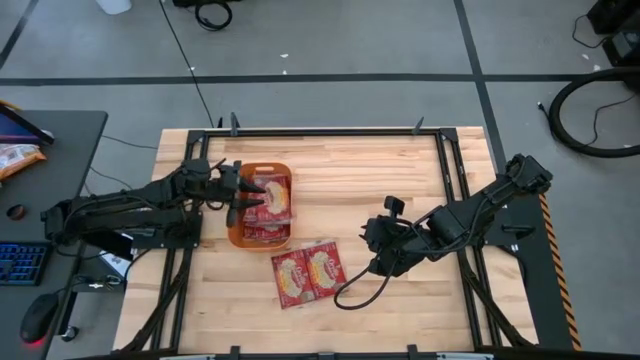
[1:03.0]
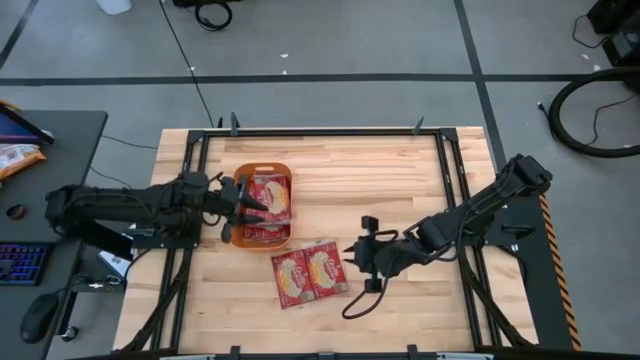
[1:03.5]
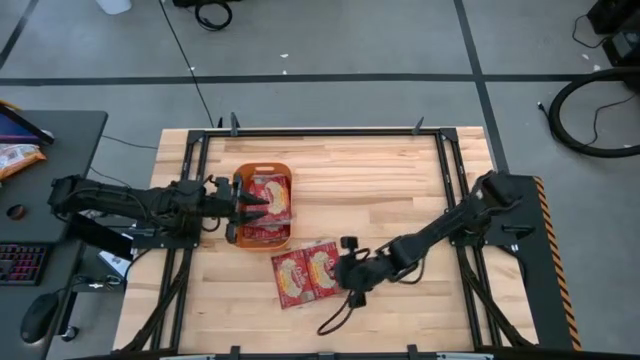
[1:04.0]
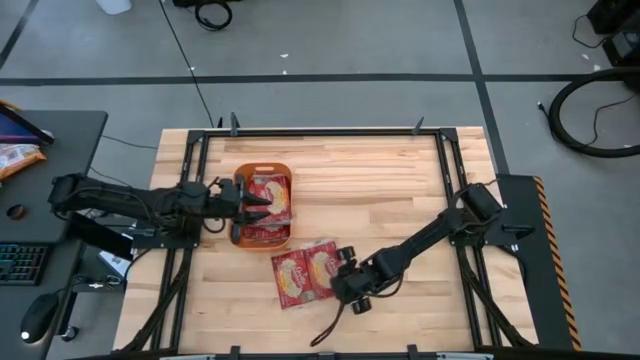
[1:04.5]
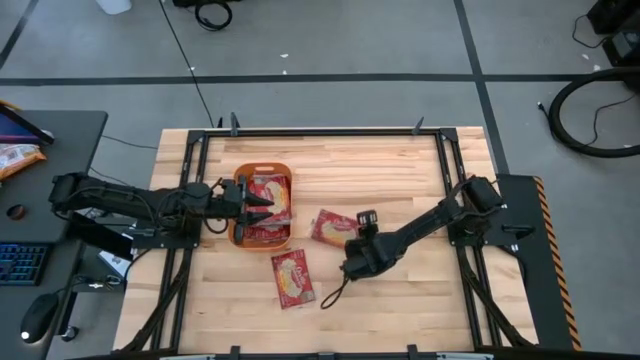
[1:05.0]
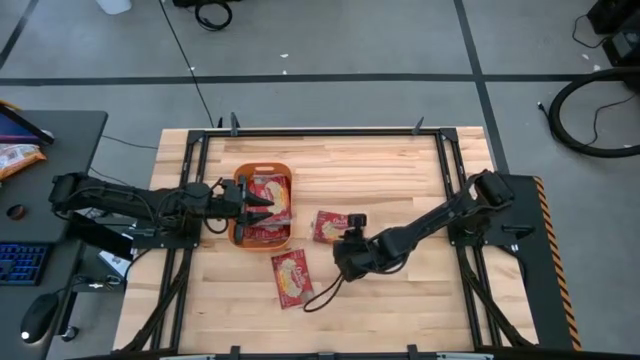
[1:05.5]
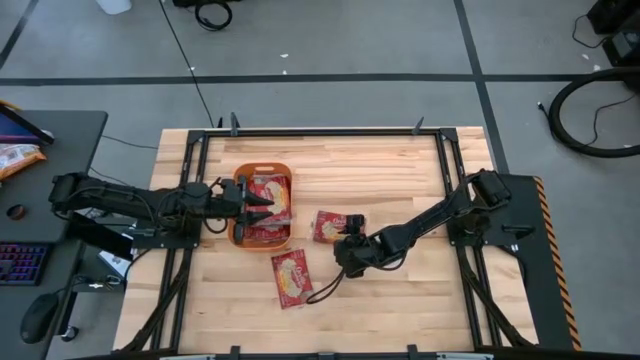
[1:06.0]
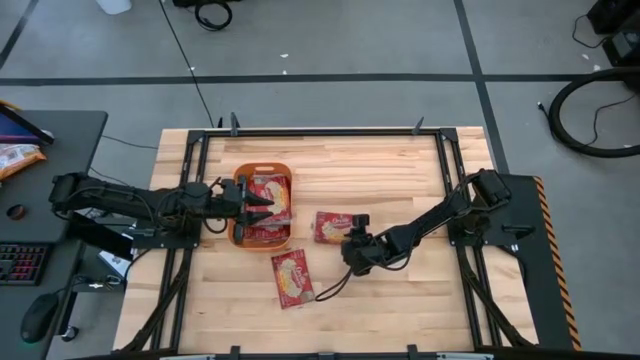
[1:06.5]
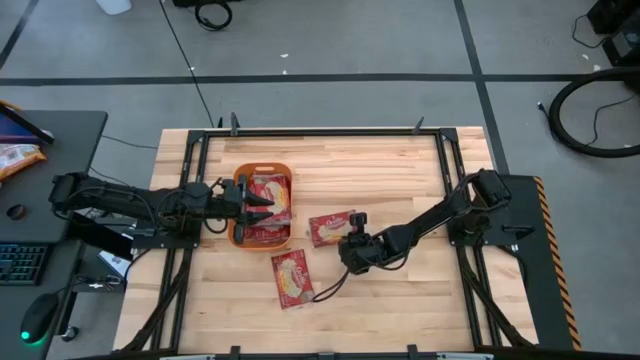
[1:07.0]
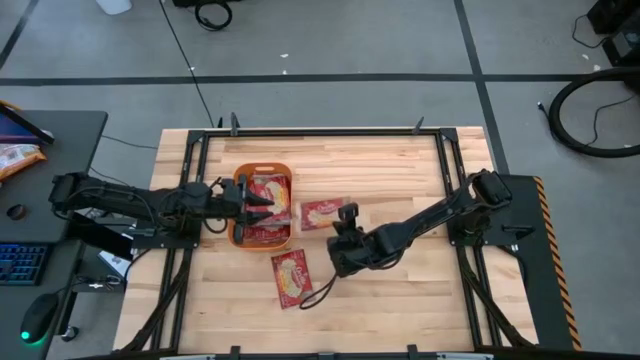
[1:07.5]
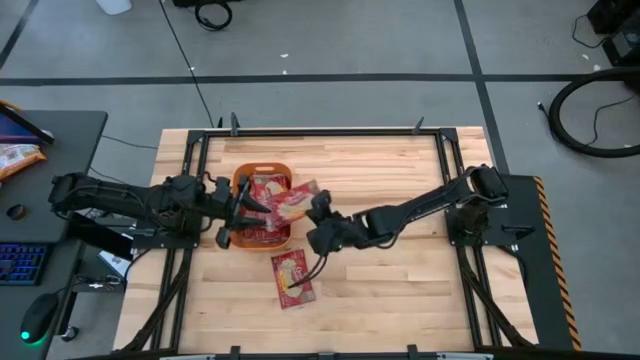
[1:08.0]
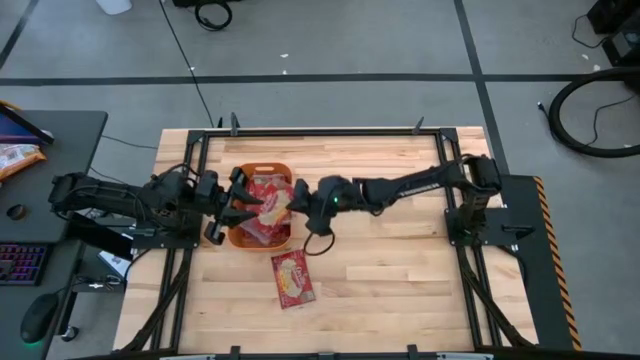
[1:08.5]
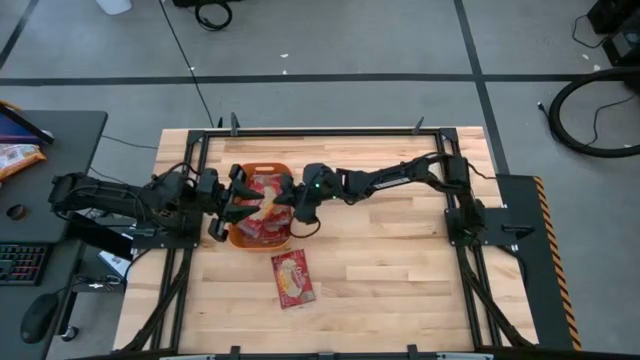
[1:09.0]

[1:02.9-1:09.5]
Task: Sort popcorn bags into baskets
Put the red popcorn bag into the orange bin

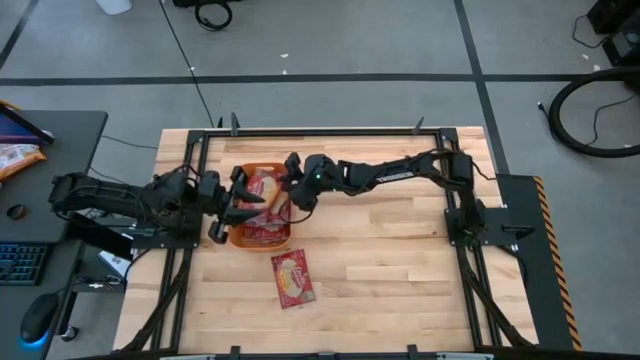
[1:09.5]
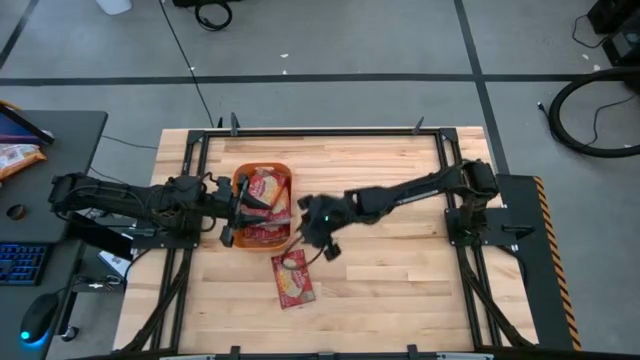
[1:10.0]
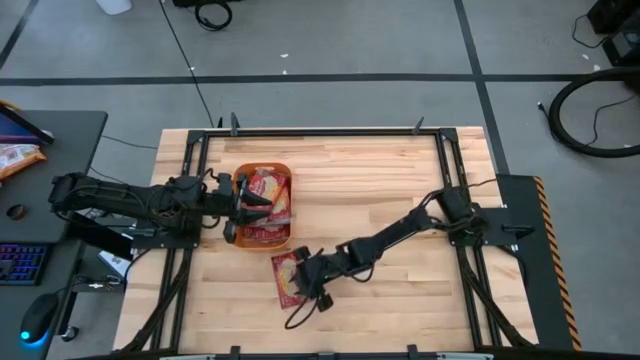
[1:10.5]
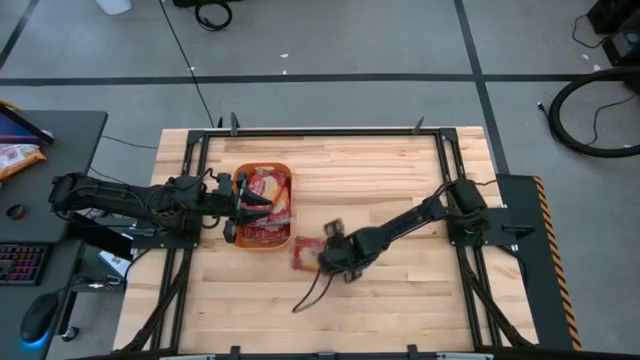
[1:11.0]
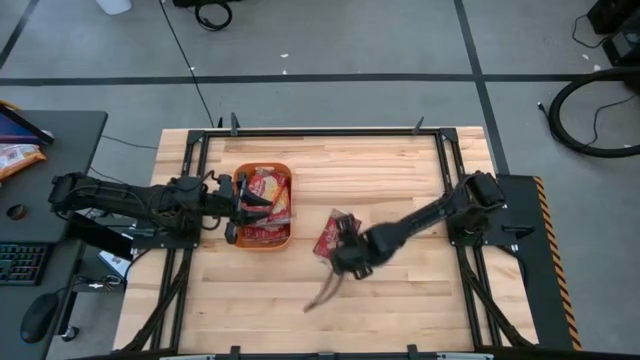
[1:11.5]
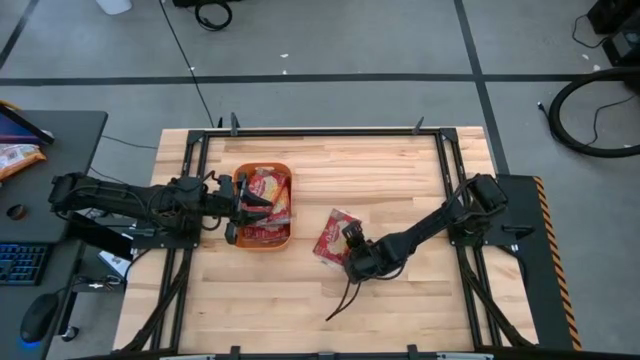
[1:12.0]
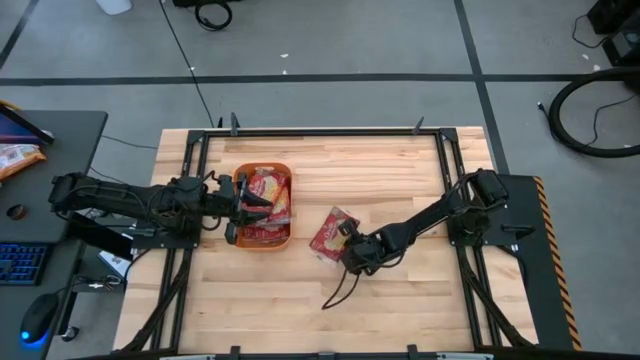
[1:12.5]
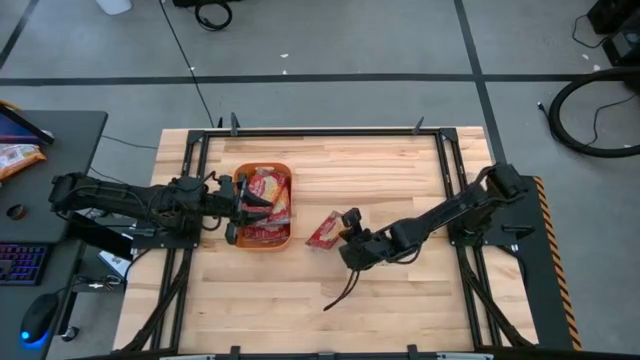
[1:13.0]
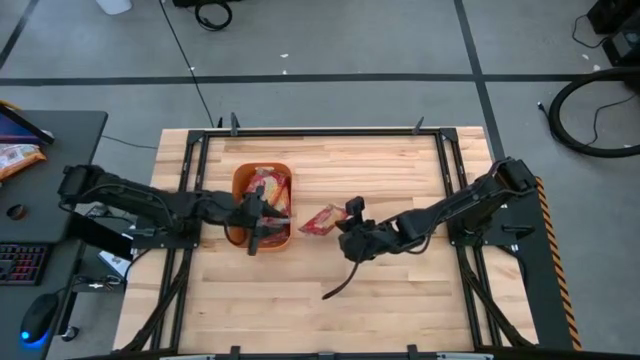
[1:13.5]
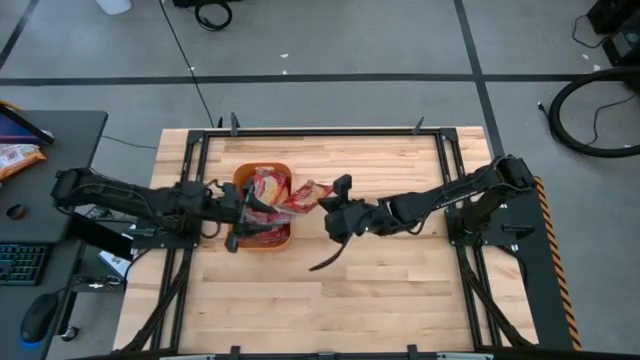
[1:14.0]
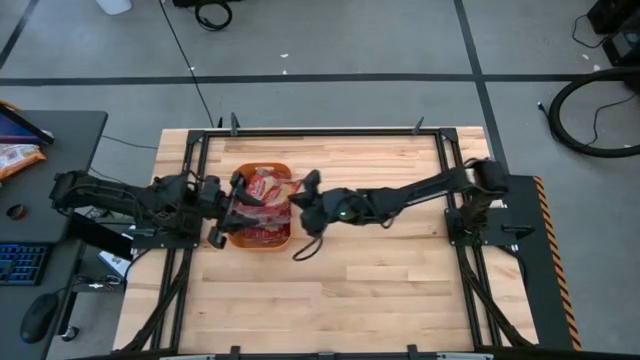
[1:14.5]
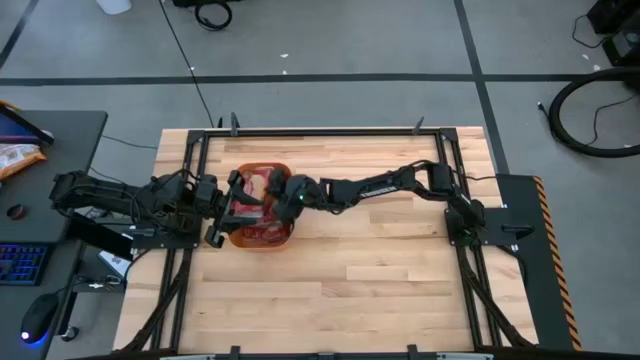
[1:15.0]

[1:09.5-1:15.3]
Put the red popcorn bag into the orange bin

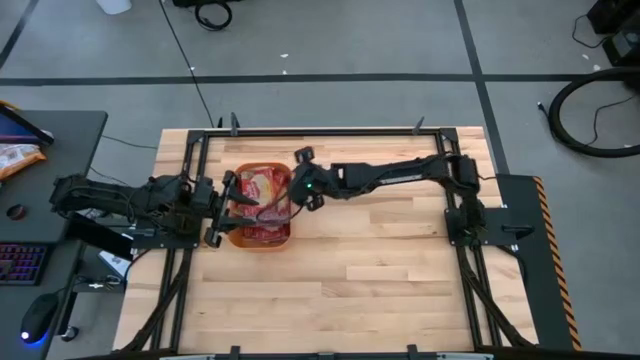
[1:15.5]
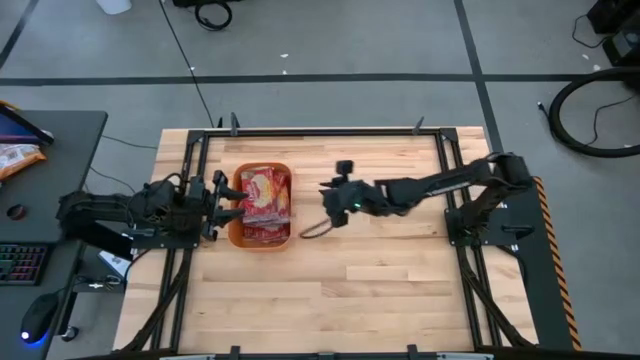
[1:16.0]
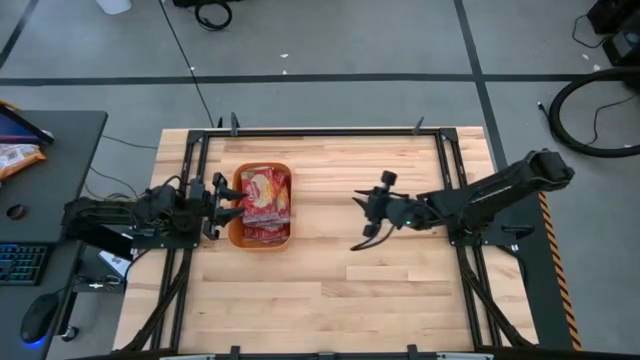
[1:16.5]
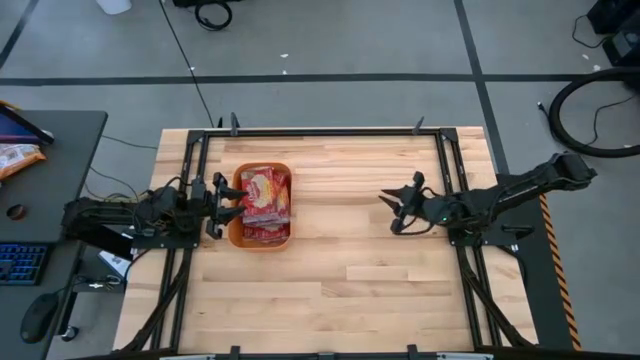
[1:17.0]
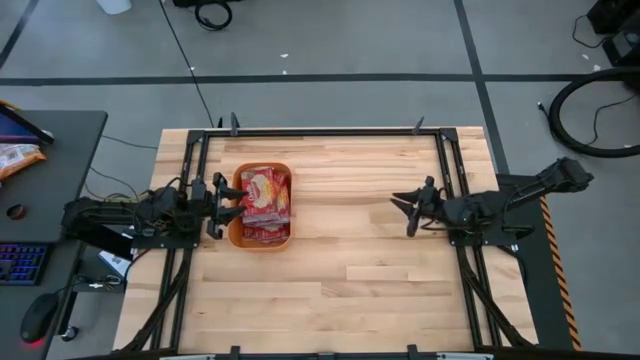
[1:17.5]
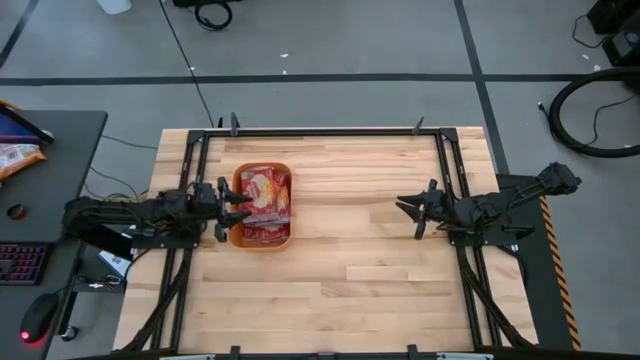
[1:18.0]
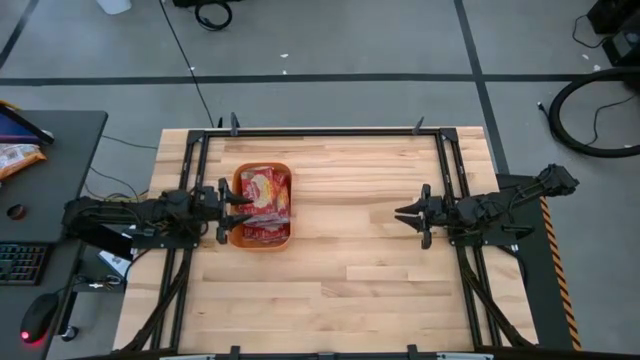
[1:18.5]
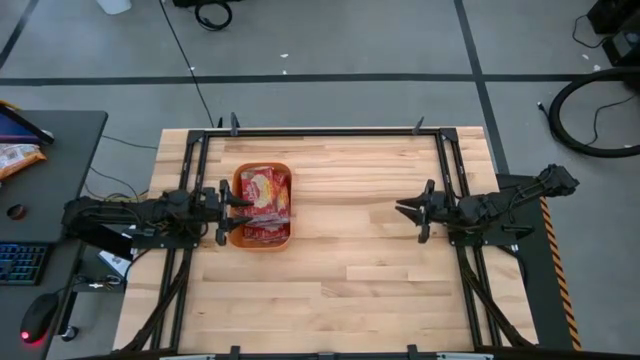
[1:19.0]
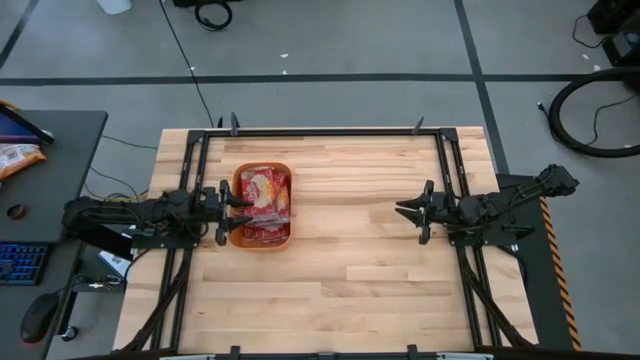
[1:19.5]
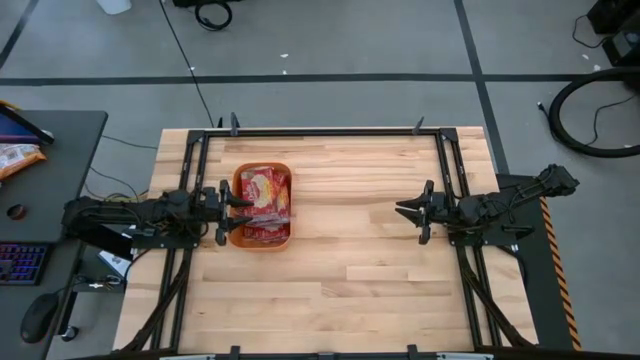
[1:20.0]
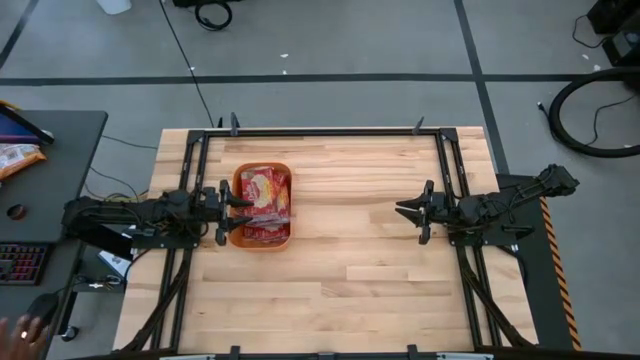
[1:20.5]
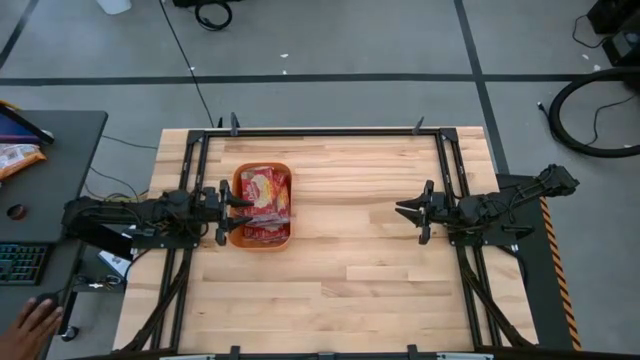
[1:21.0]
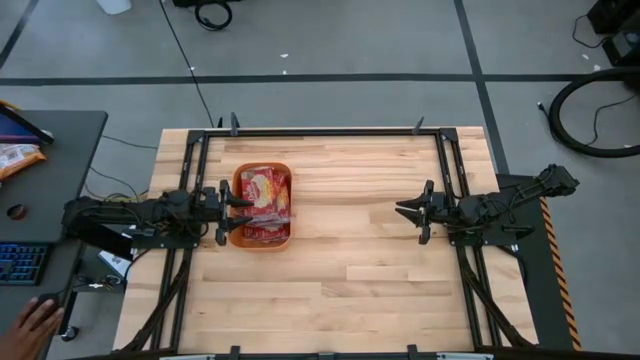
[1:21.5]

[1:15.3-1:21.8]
Return to Home Position

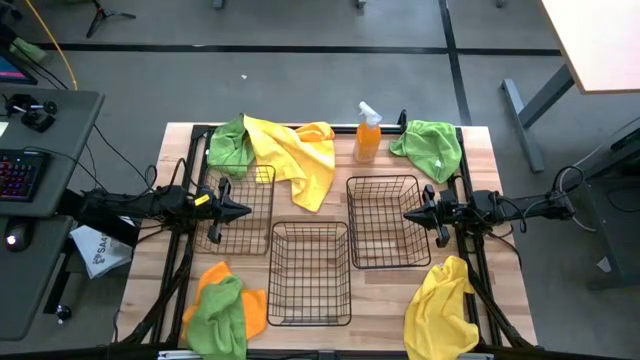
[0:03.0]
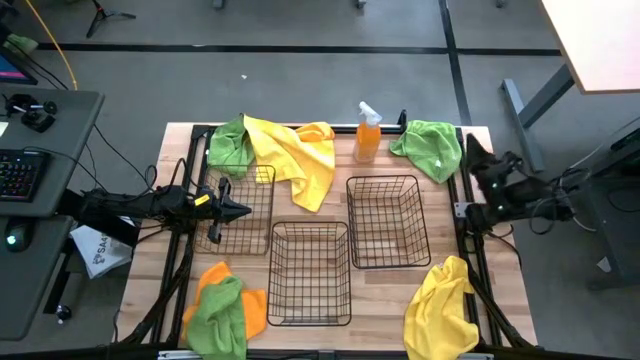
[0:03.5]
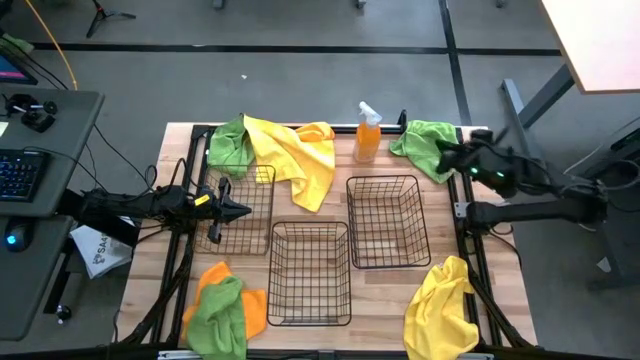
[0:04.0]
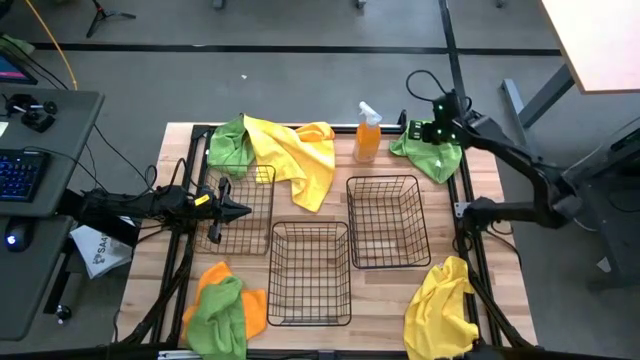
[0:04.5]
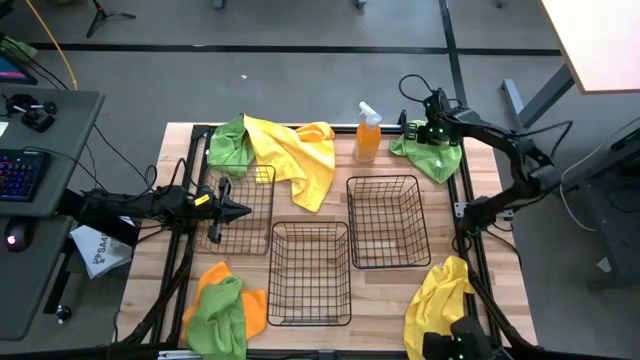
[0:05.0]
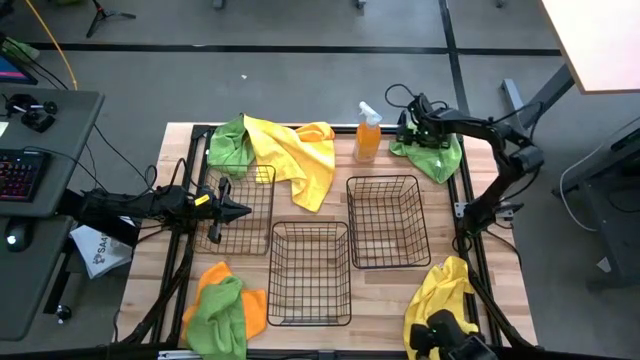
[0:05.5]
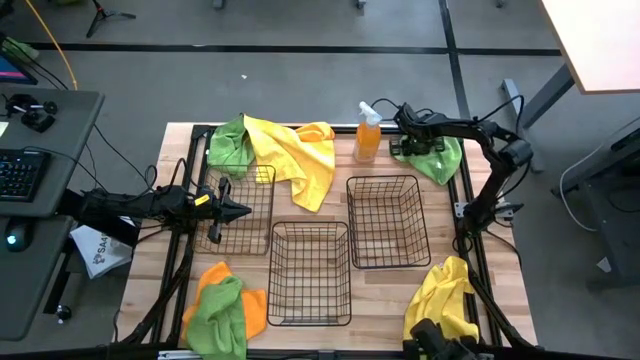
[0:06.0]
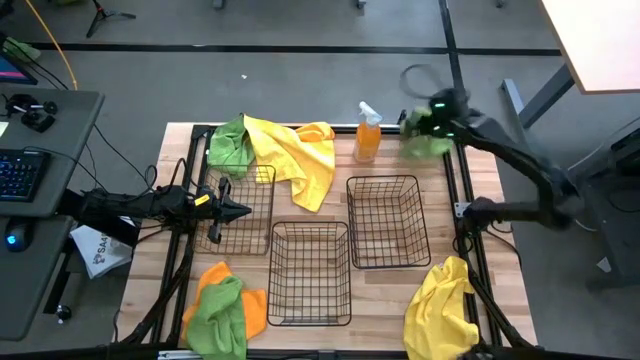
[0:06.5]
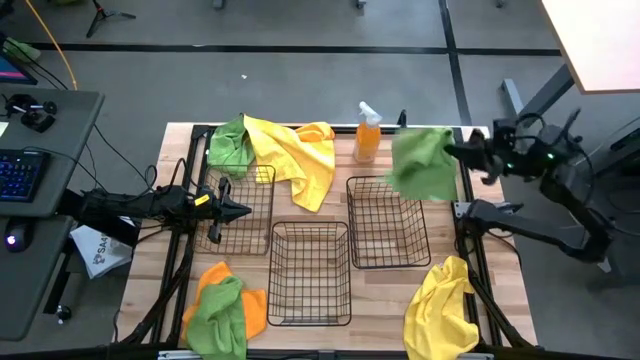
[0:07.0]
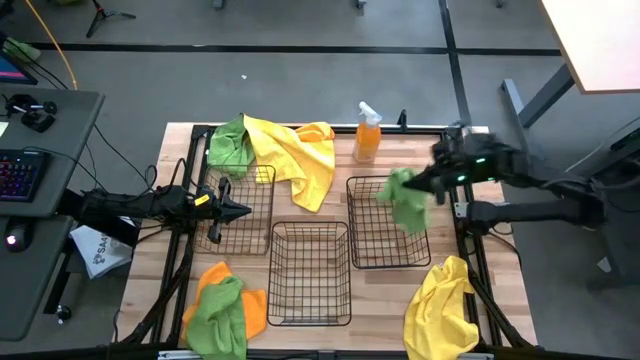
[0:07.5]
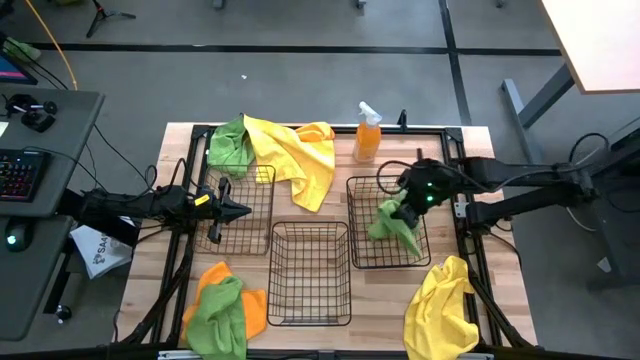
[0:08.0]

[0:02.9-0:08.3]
Task: Sort microfiber towel by color & place in baskets
Put the top right green microfiber cloth into the right basket
